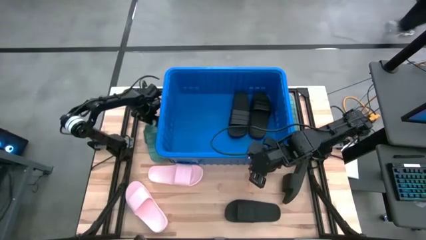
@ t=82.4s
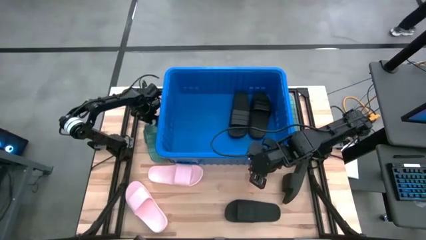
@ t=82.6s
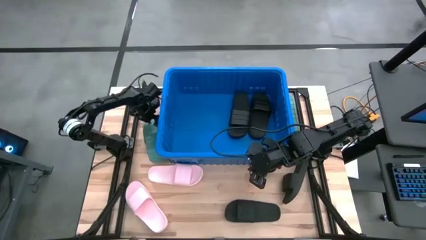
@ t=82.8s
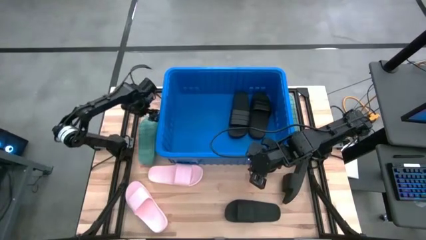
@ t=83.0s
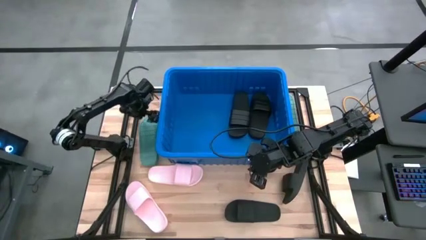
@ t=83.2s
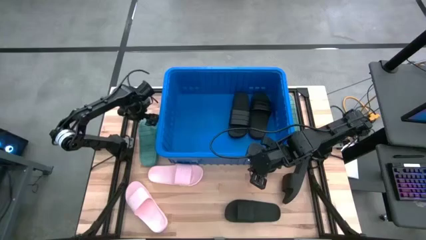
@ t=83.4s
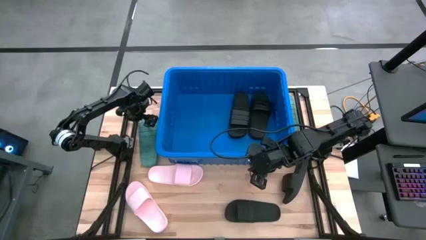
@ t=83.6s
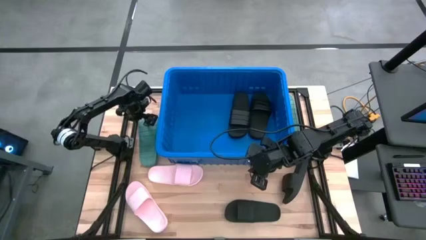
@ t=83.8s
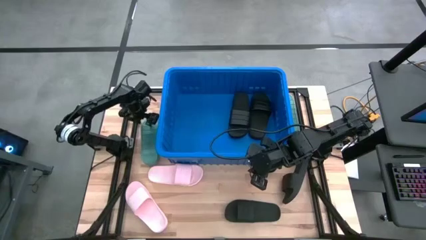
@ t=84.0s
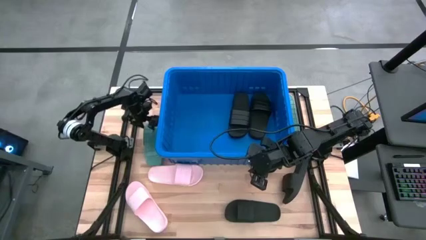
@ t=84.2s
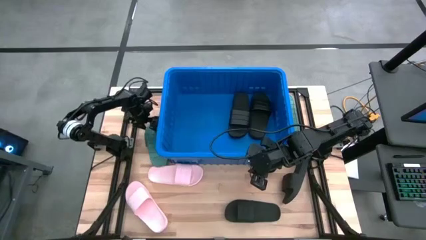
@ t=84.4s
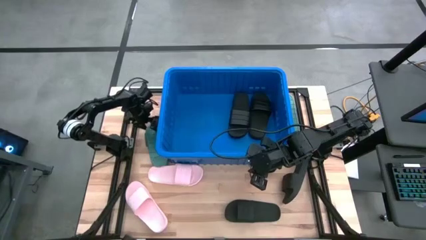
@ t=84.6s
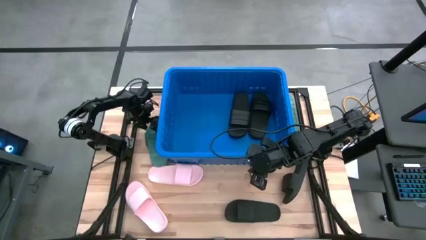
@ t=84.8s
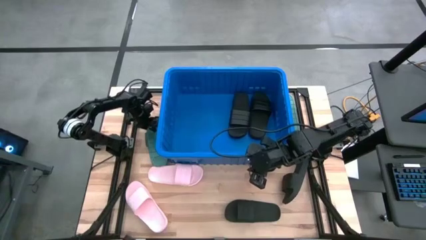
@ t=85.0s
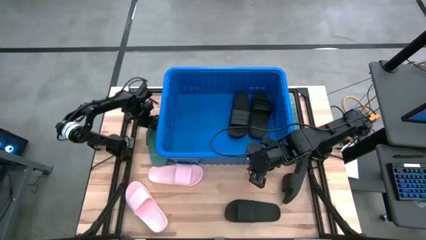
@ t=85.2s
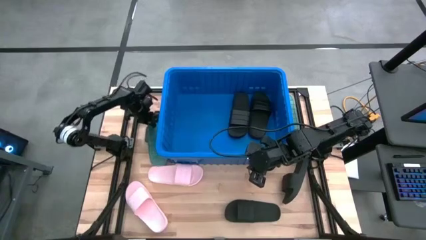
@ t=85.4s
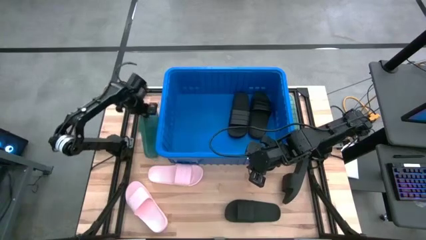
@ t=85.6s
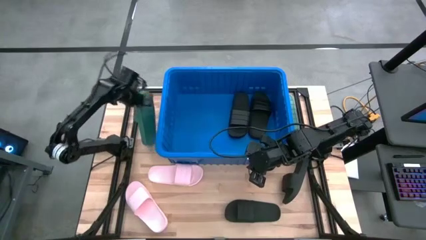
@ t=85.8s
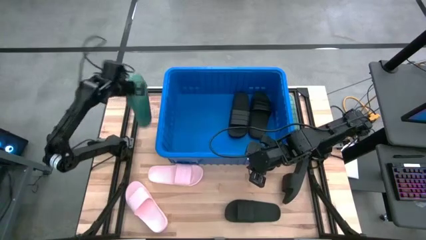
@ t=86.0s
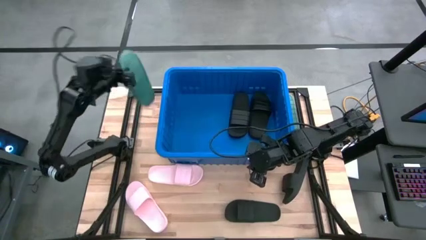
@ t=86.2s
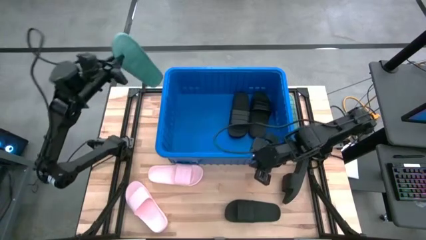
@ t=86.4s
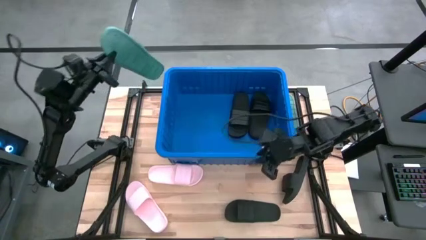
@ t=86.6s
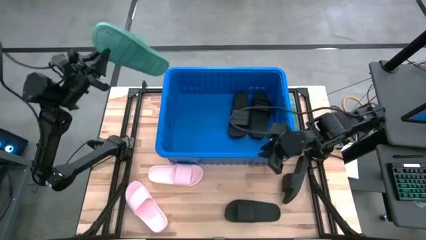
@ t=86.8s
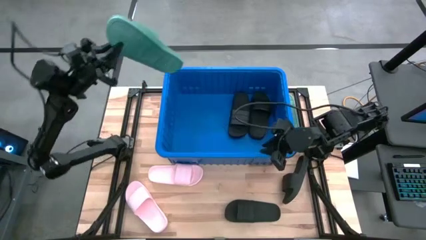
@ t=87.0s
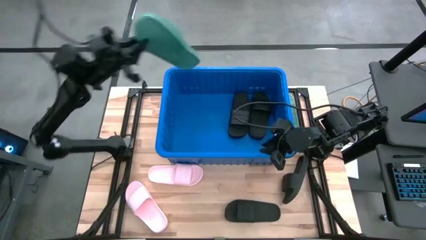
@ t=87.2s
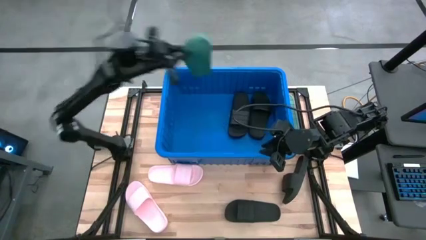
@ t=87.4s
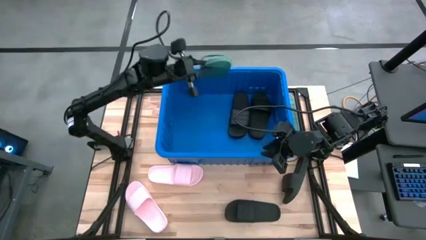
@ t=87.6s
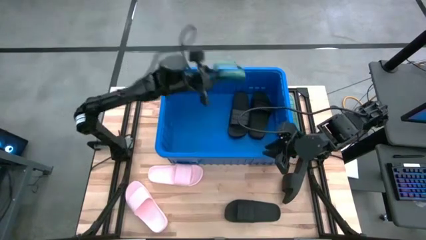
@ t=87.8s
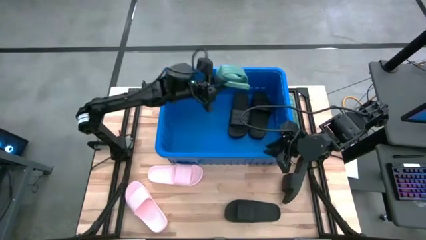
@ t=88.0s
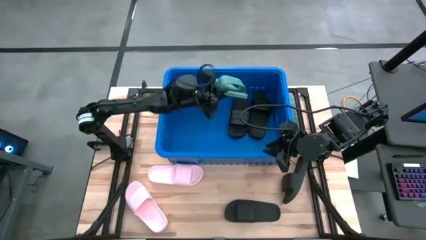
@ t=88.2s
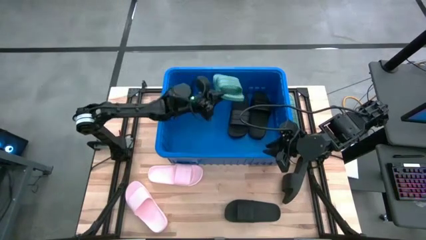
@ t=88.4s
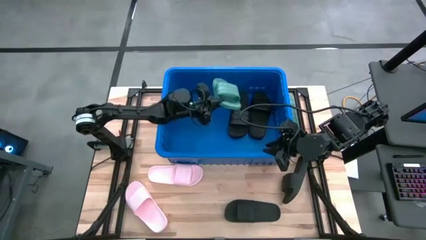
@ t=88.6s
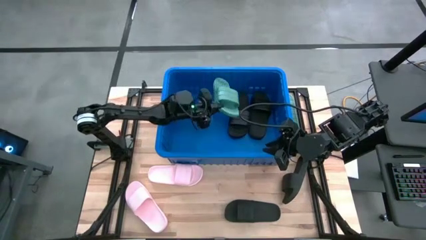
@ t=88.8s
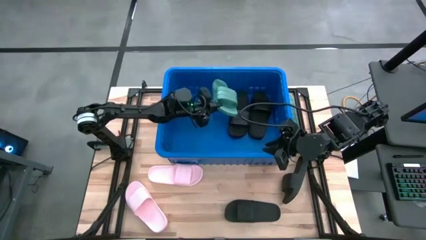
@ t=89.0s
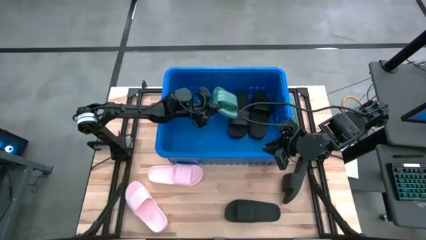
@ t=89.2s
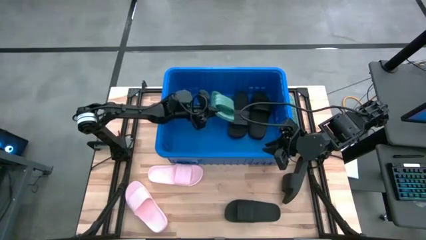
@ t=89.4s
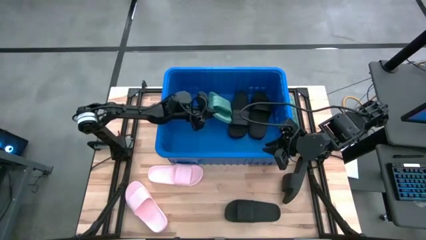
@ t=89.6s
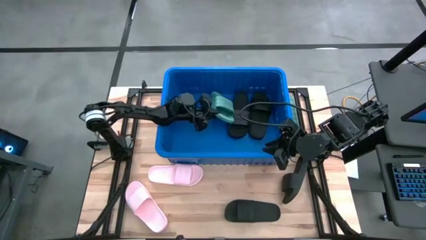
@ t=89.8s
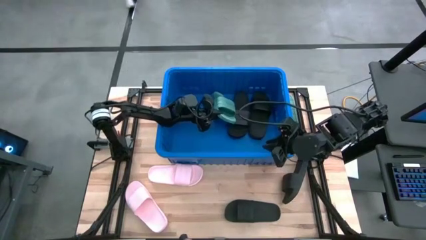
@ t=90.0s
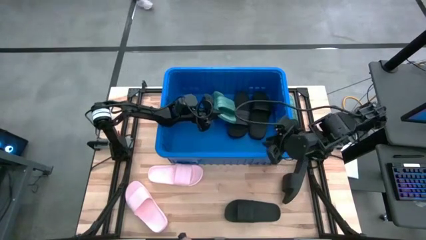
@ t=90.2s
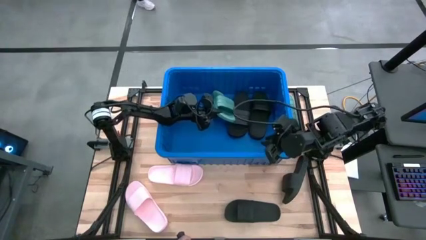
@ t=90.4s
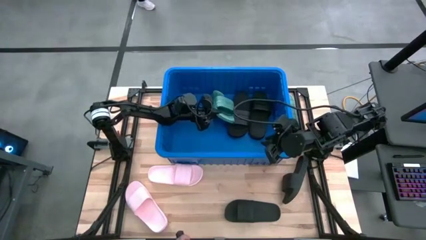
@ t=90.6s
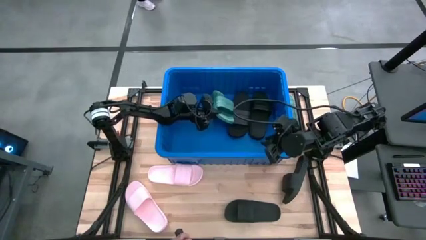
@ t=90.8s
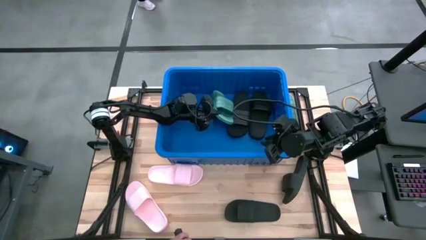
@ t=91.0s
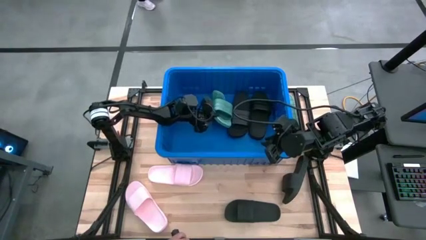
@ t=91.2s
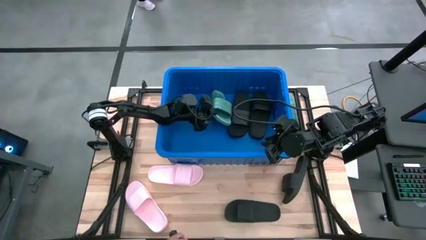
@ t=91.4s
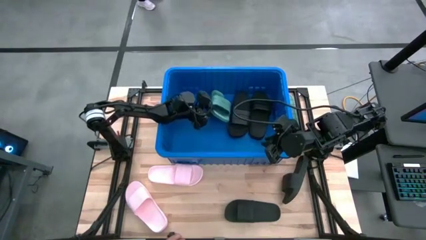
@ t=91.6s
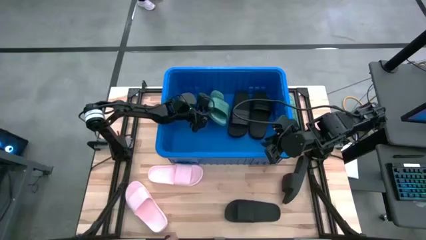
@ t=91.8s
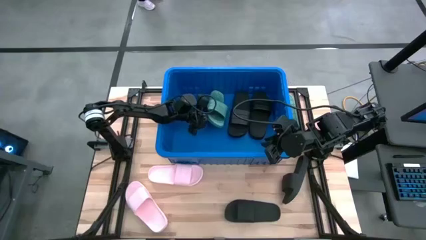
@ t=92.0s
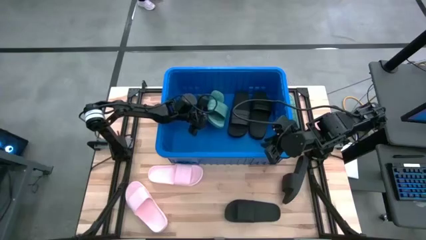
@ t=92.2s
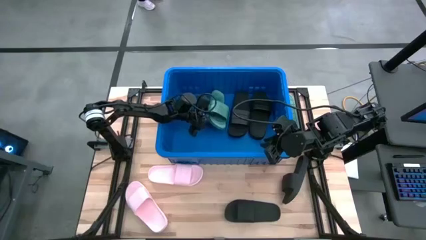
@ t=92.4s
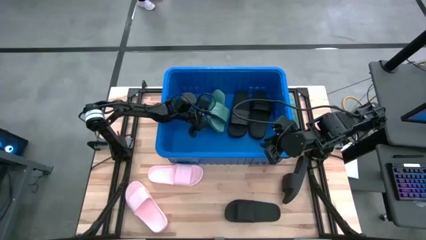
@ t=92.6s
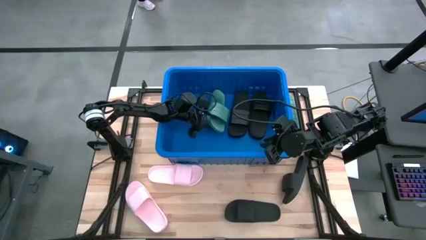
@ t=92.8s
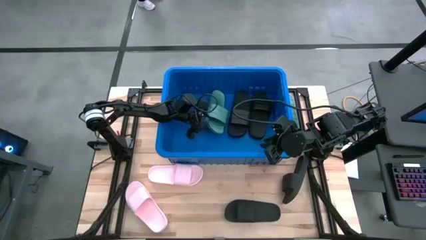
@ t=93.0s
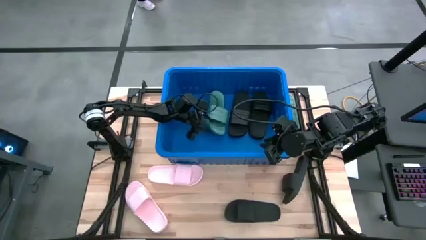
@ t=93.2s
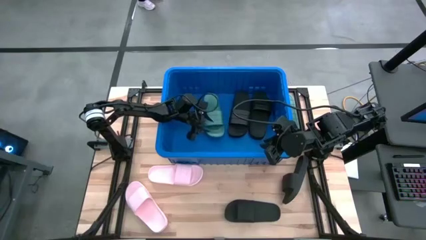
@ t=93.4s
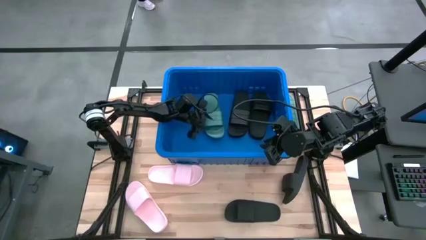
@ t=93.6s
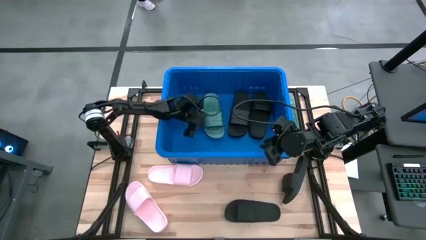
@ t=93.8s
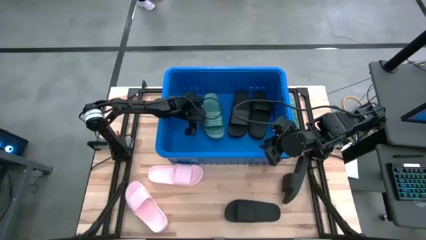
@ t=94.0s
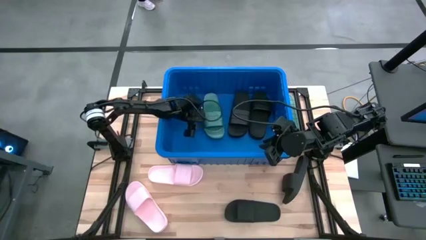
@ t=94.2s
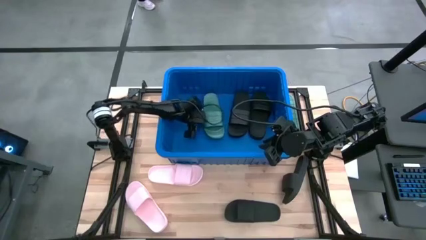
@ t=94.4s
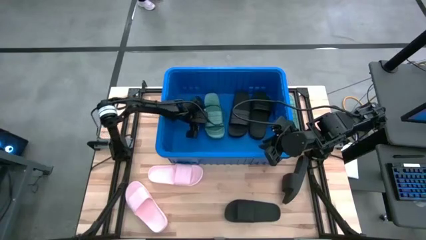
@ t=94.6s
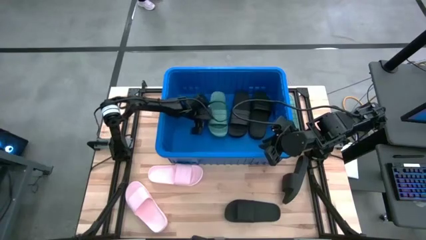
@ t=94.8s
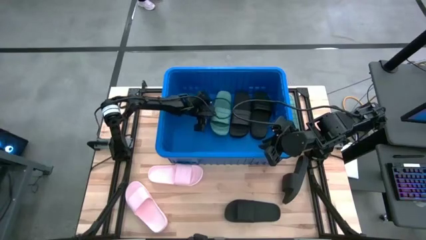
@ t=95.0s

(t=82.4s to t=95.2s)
Task: Pick and place slides into bin
Put the green left slipper into the blue bin
